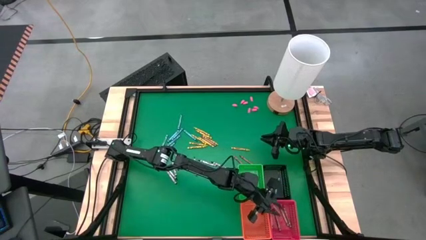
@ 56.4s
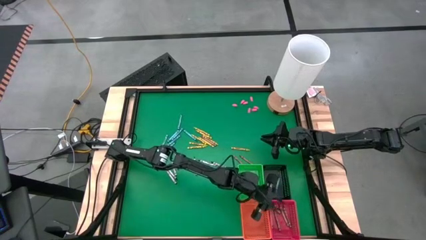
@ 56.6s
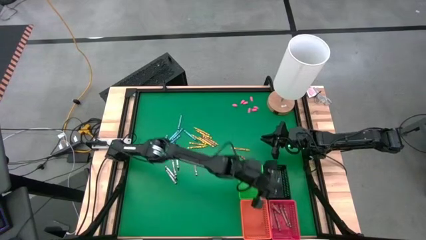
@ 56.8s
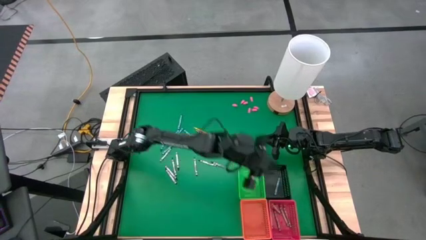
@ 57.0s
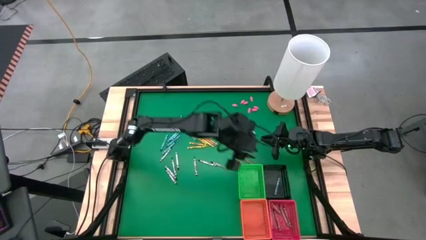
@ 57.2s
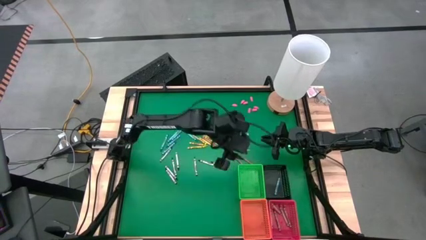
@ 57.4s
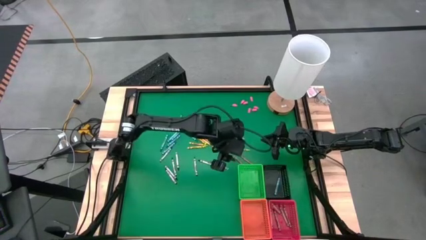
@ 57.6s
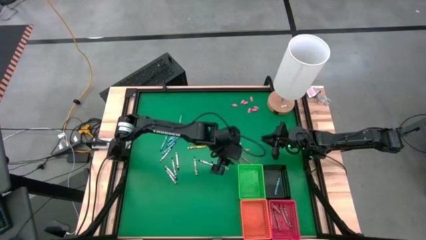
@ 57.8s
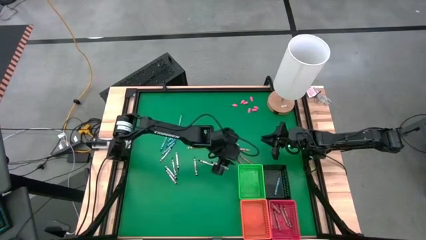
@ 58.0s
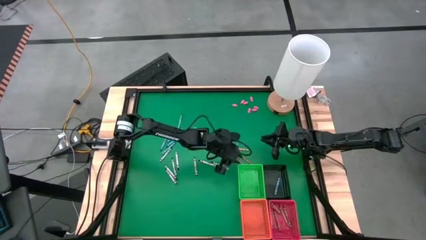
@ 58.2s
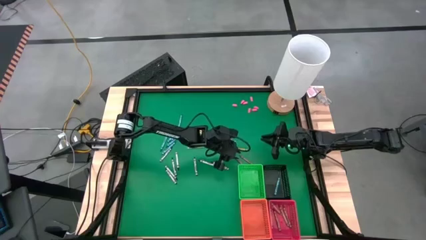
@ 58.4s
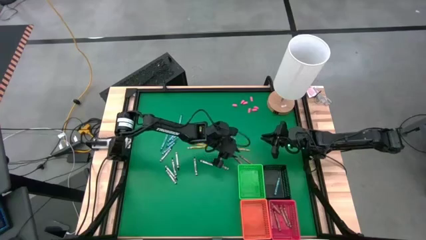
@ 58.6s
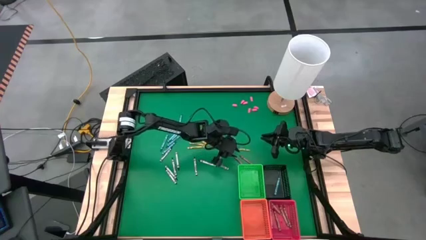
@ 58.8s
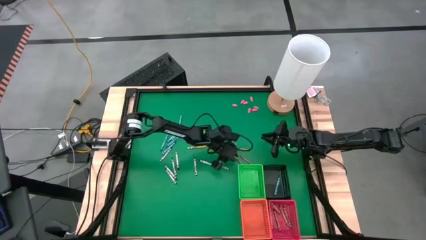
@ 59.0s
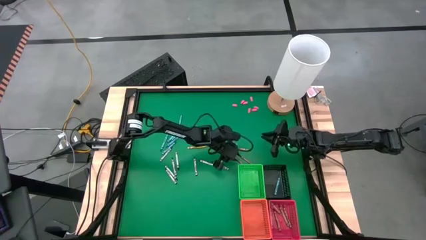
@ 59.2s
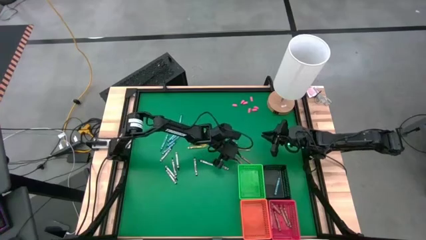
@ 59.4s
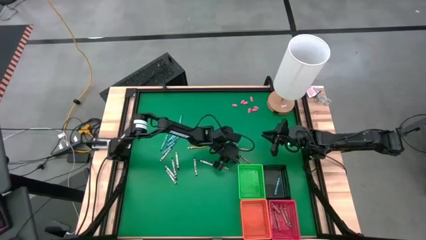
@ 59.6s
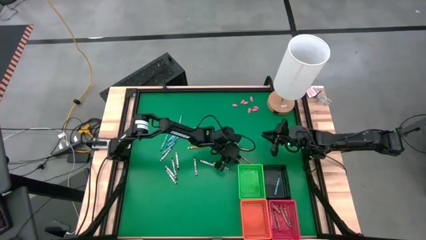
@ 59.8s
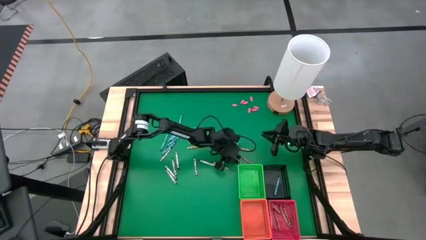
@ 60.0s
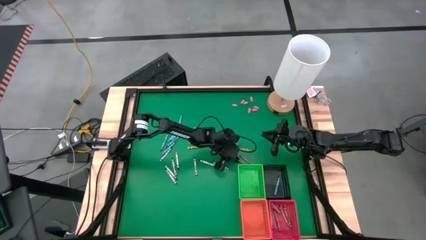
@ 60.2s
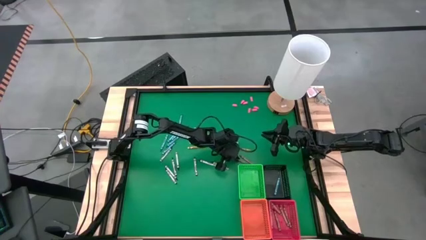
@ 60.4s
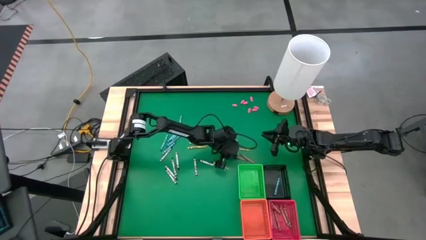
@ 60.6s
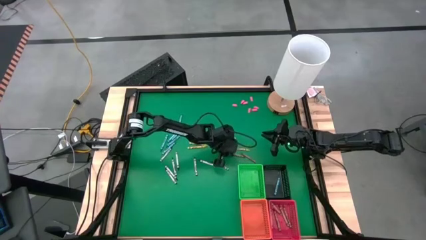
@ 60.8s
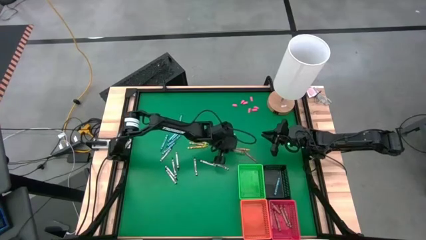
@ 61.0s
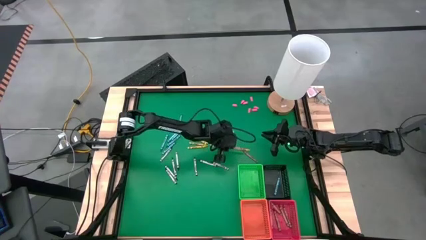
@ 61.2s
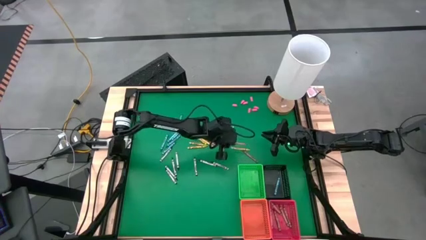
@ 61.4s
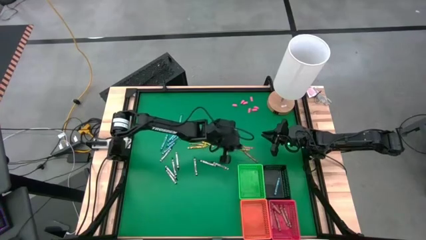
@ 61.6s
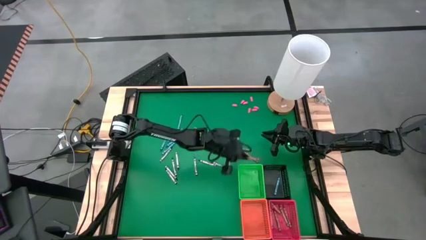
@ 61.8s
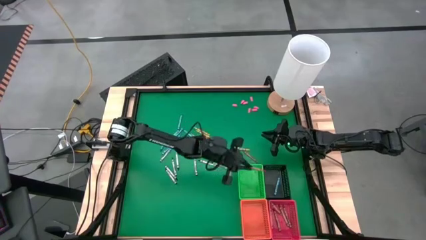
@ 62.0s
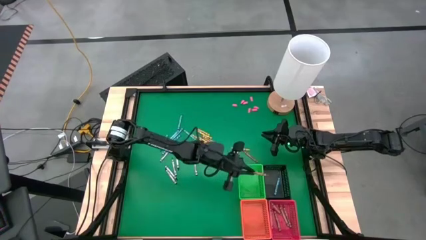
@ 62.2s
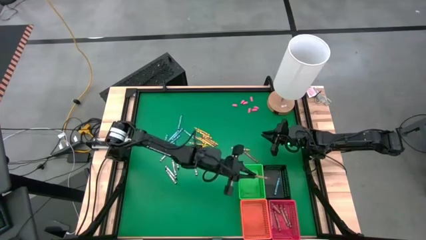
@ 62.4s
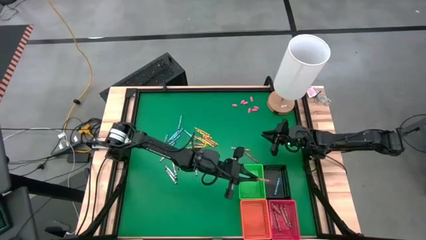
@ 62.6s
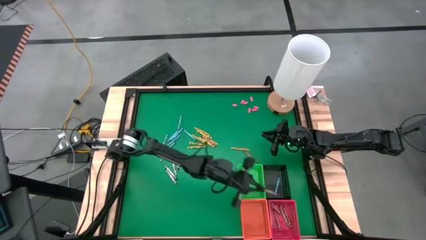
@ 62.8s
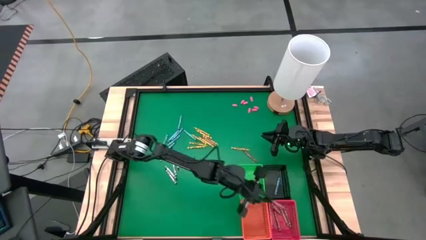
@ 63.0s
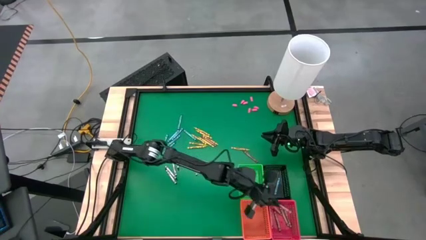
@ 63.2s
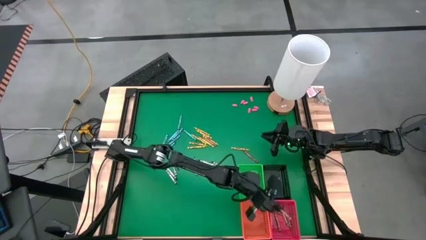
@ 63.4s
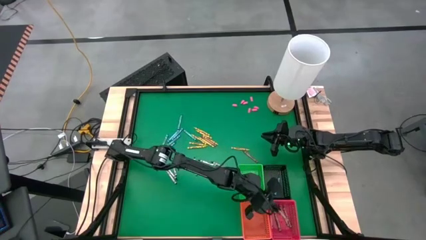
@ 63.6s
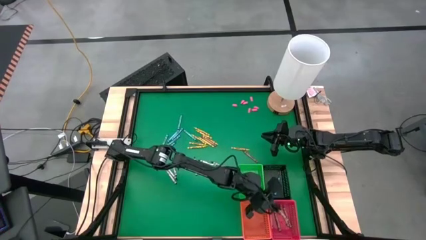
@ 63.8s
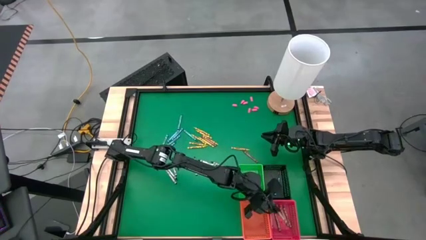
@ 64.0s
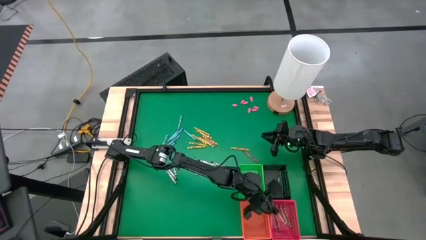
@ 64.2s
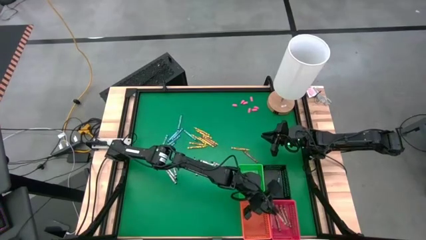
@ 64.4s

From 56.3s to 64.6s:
Task: Sort crayons
Put the brown crayon into the red bin

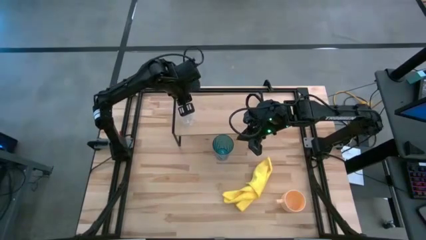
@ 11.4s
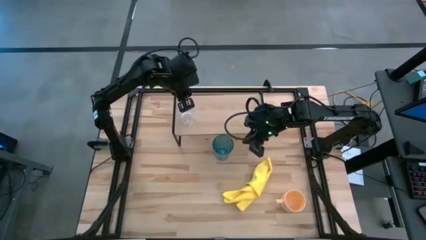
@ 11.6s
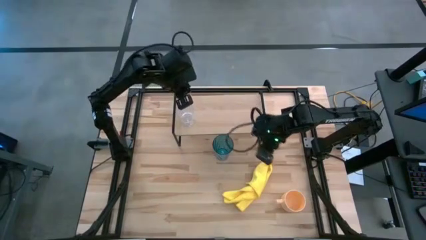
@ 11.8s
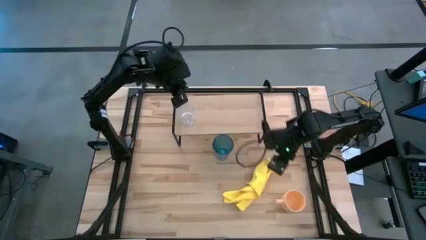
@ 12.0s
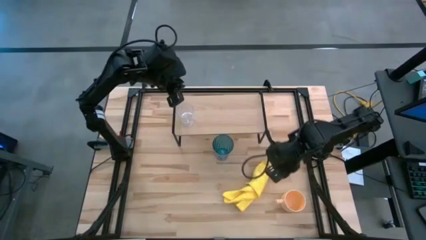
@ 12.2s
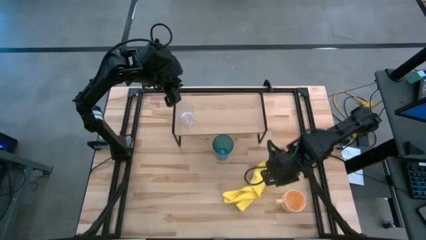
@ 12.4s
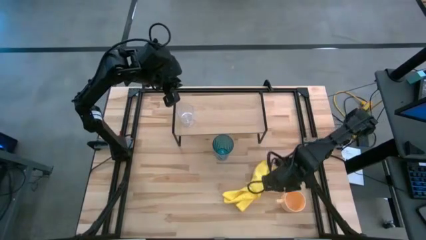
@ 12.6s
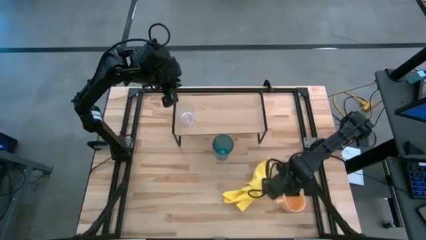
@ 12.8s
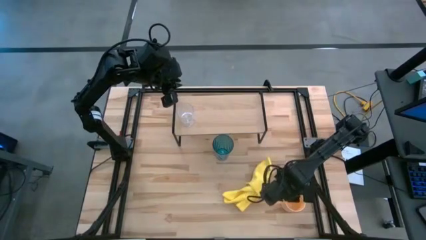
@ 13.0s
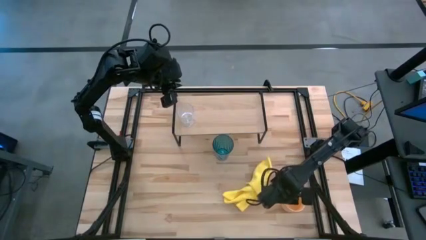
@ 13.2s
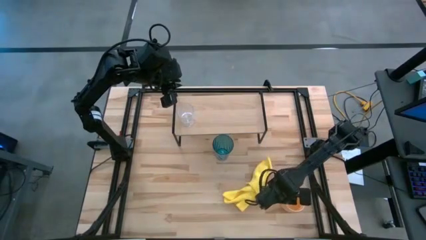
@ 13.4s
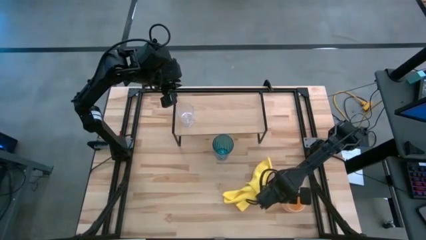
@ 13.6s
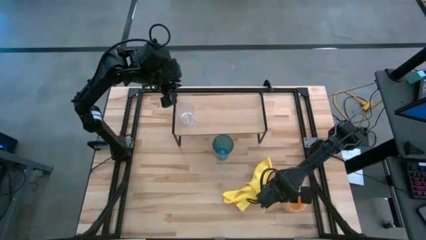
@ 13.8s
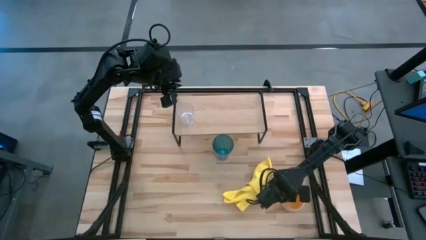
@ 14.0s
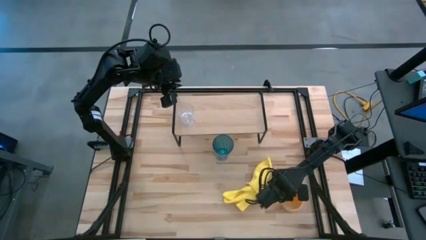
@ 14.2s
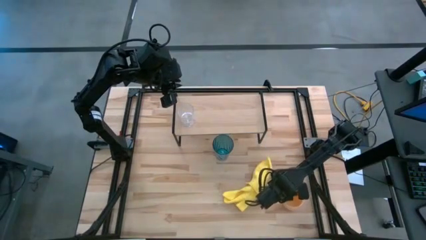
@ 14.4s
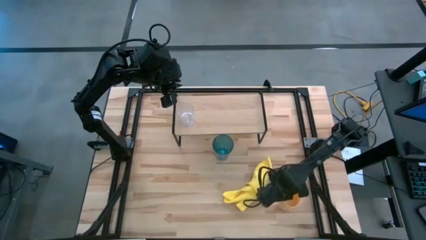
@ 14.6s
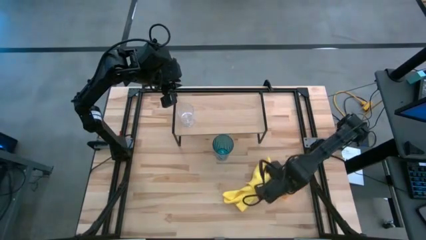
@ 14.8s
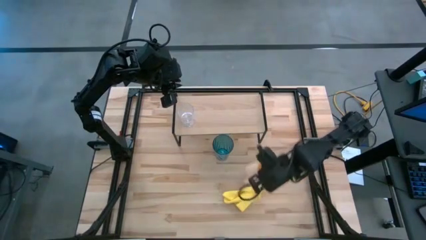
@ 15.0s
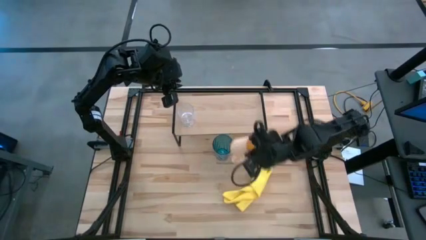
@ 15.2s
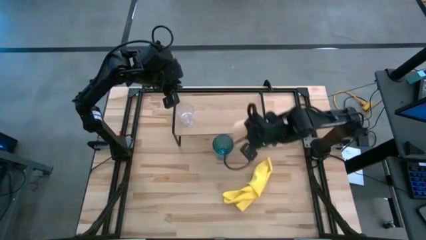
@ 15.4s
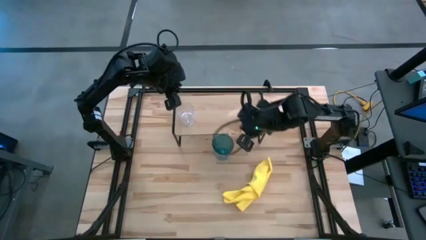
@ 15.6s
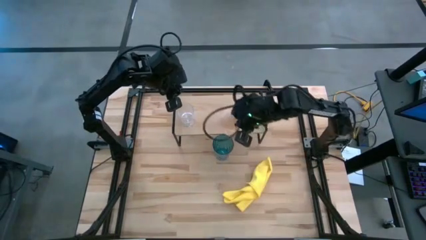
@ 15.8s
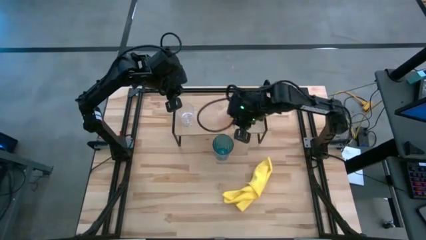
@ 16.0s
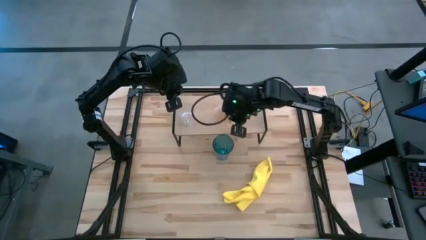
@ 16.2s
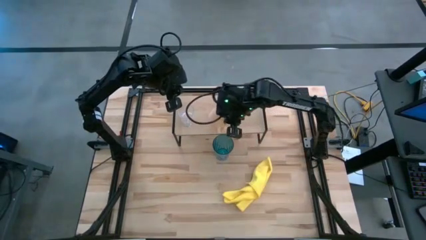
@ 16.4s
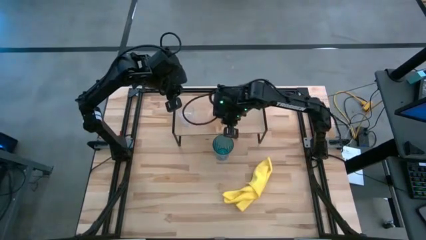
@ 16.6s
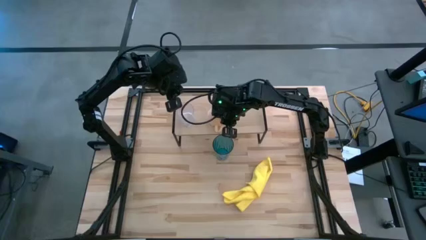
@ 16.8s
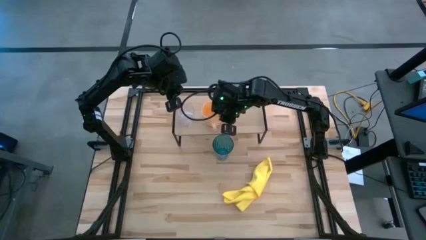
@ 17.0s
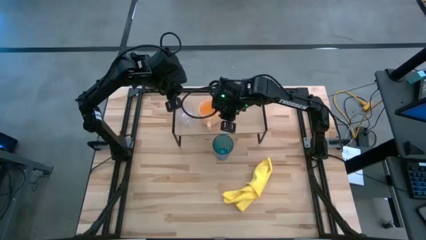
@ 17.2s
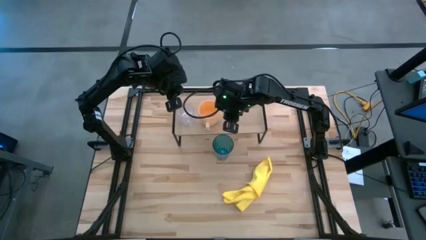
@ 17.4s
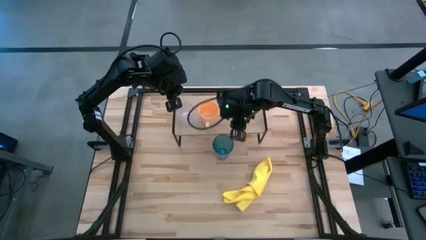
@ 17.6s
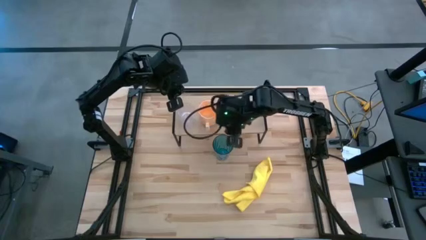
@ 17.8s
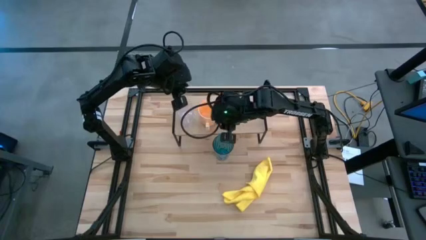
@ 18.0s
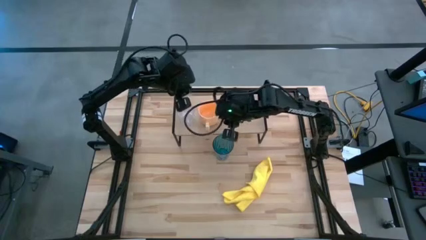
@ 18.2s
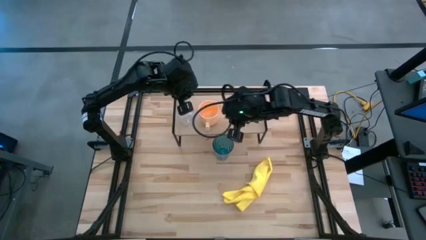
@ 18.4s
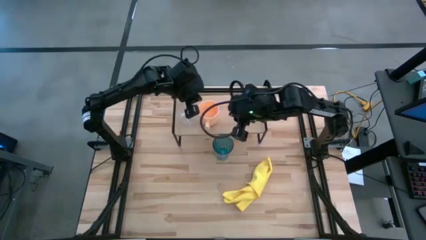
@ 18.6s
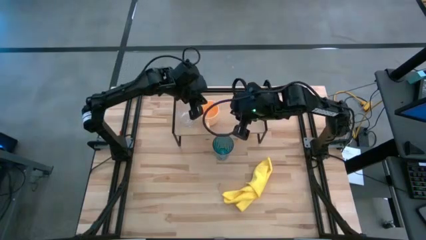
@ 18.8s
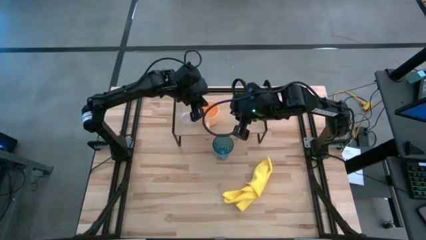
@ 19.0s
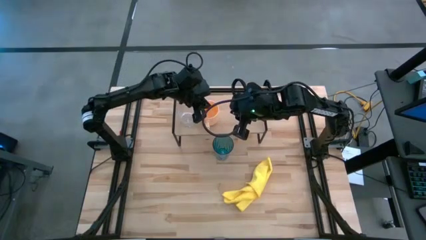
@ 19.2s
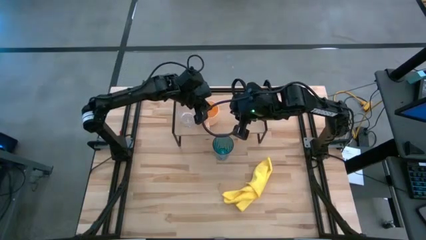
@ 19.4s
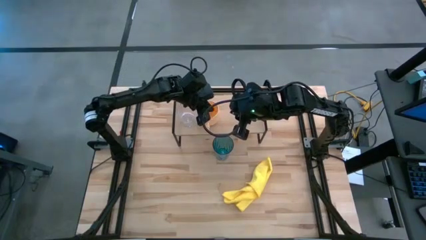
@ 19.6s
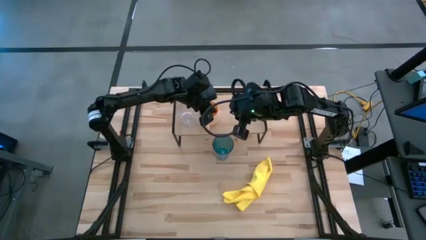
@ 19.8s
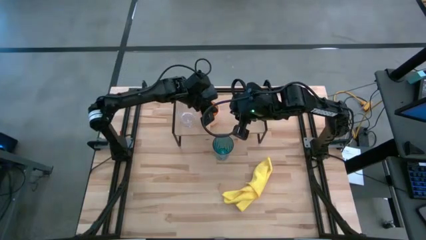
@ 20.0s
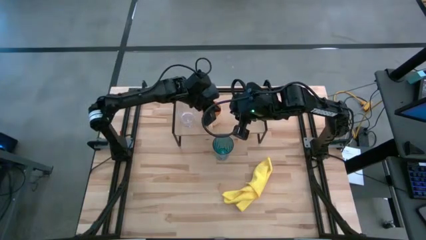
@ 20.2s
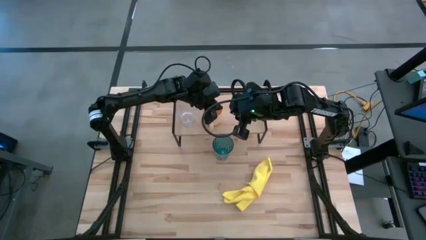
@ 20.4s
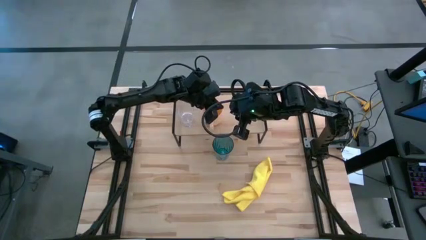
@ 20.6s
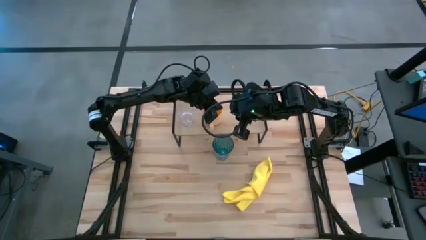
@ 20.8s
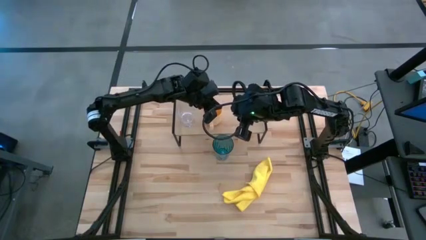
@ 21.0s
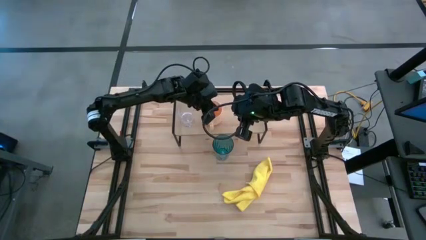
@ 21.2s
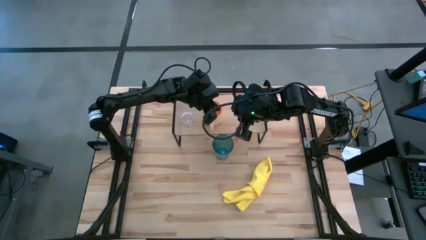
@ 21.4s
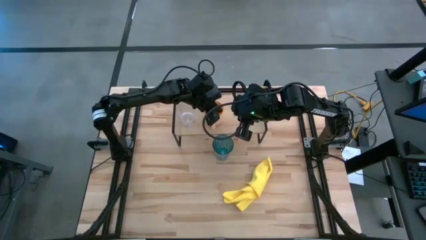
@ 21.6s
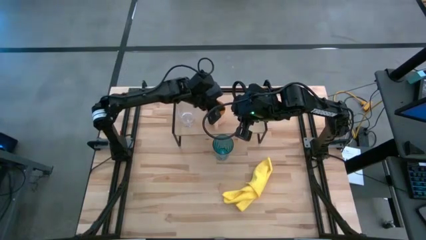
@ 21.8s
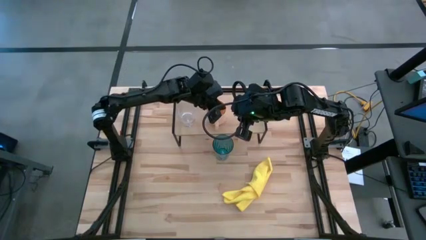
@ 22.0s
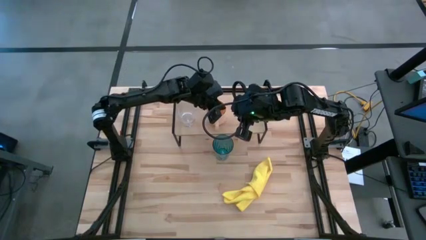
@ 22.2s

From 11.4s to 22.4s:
Task: Stack small to large cups/mugs on shelf
Put the yellow mug on the shelf
